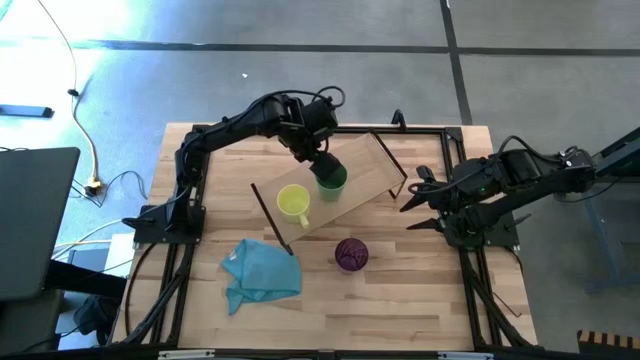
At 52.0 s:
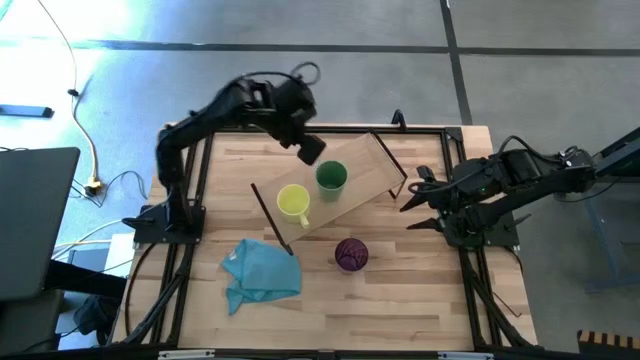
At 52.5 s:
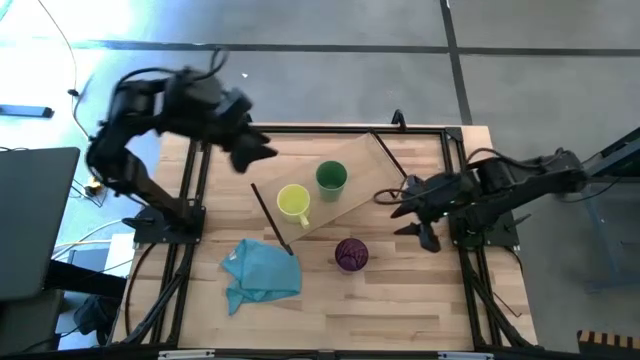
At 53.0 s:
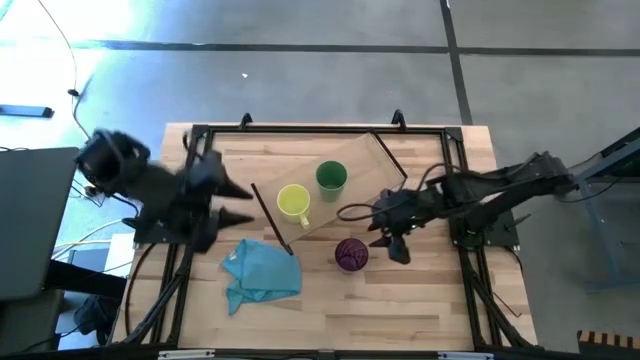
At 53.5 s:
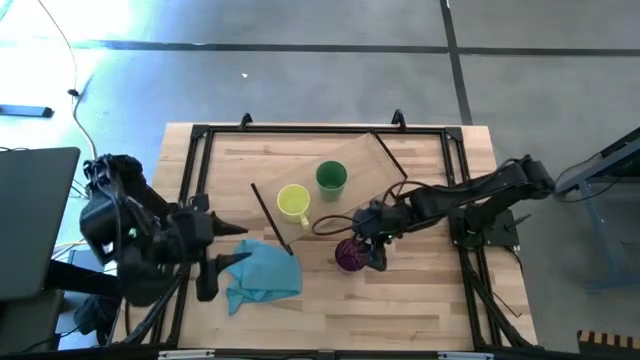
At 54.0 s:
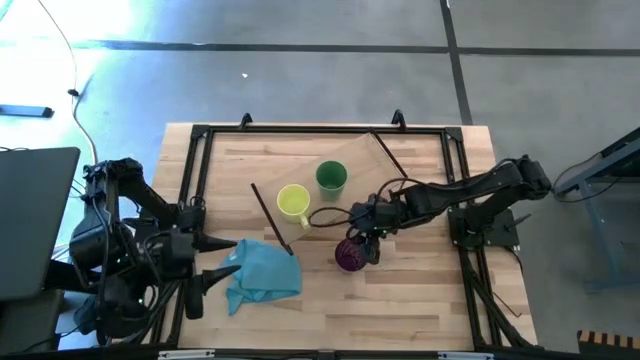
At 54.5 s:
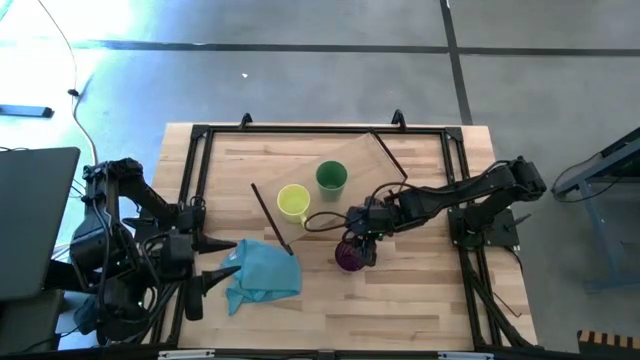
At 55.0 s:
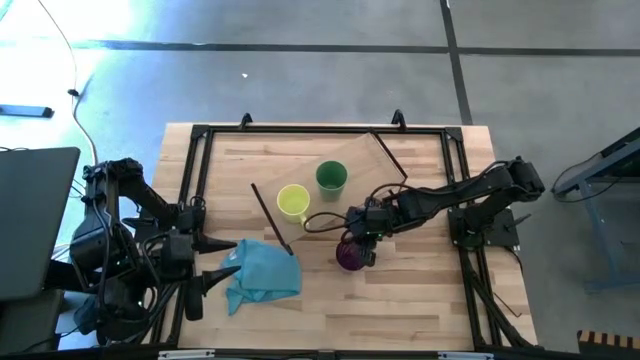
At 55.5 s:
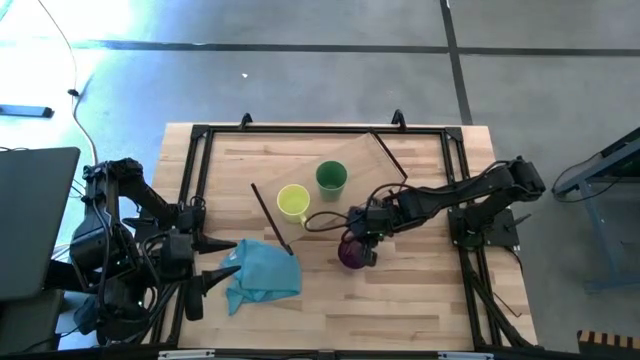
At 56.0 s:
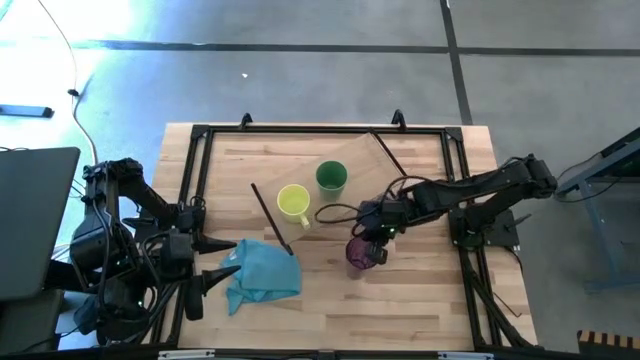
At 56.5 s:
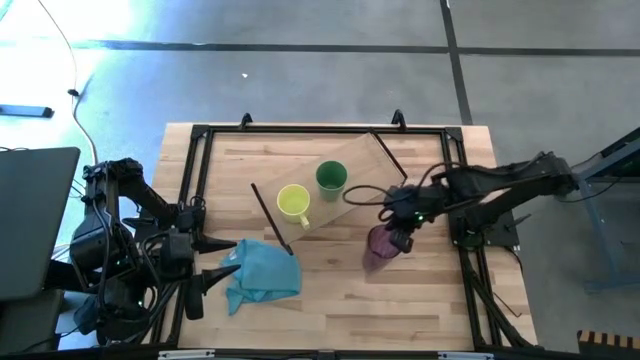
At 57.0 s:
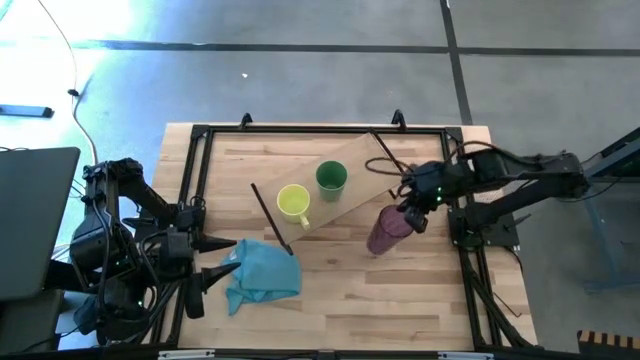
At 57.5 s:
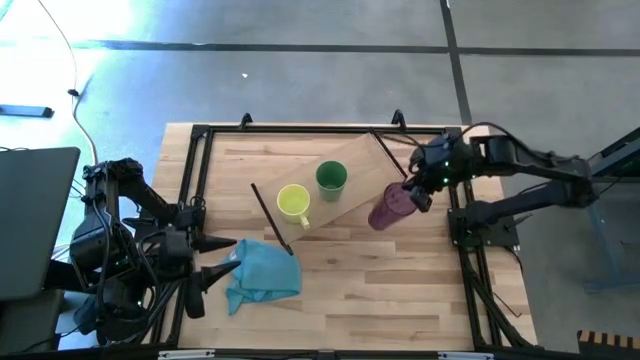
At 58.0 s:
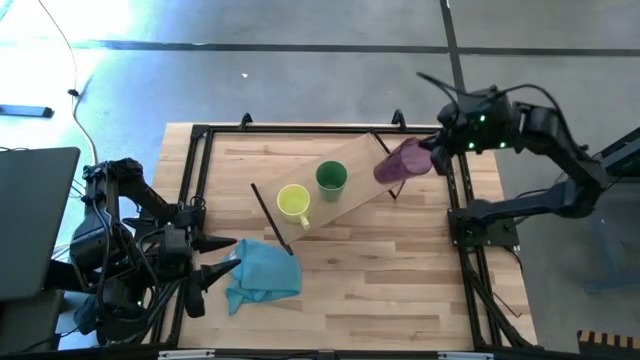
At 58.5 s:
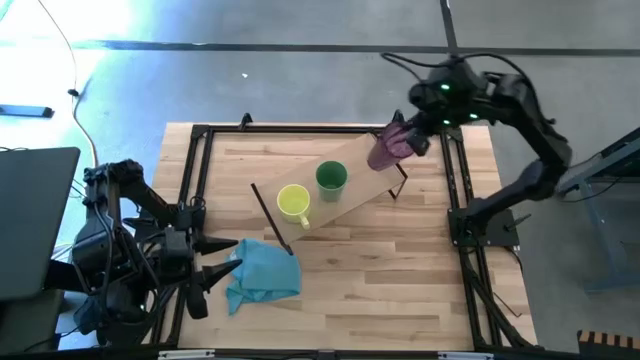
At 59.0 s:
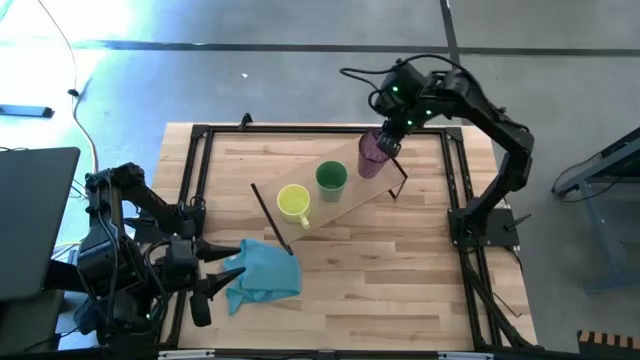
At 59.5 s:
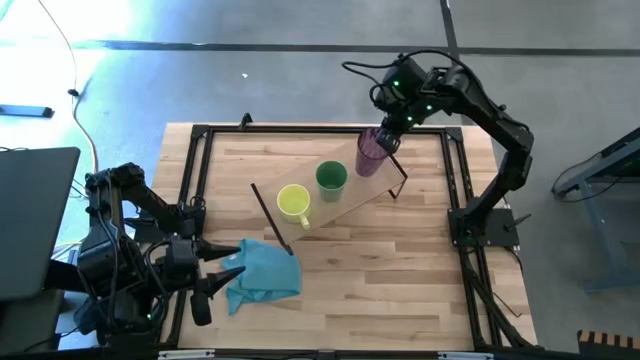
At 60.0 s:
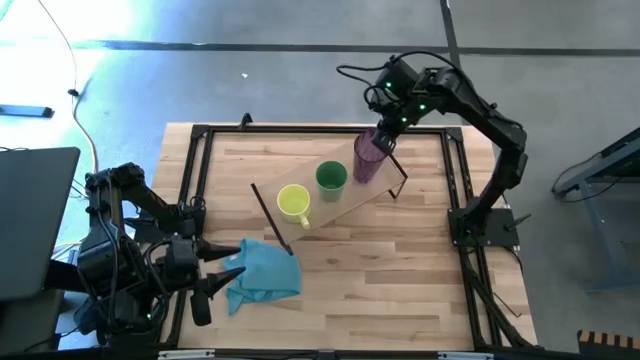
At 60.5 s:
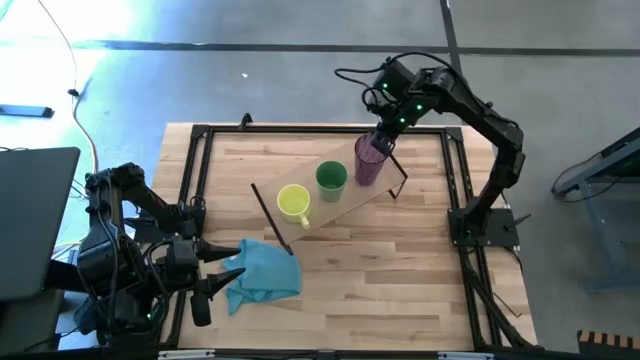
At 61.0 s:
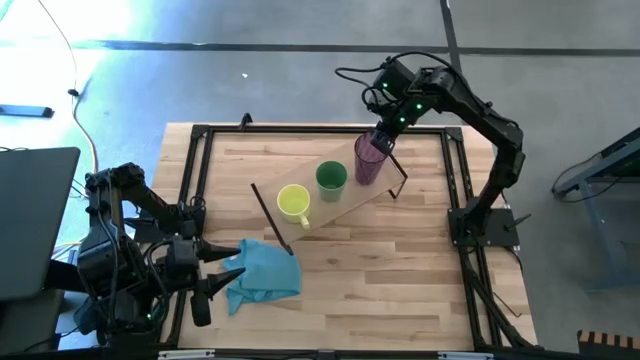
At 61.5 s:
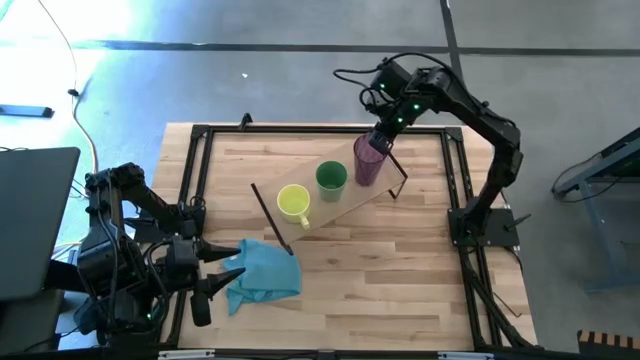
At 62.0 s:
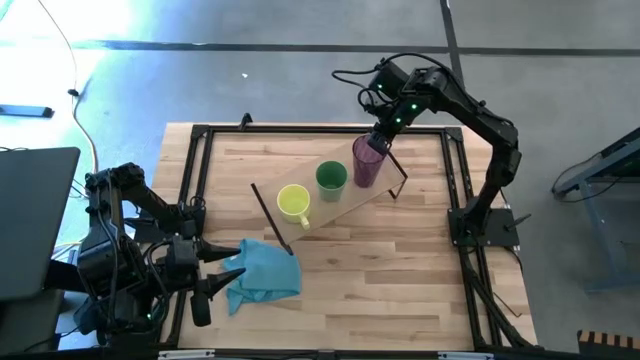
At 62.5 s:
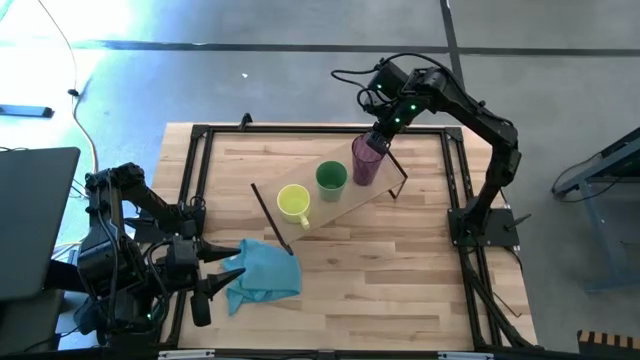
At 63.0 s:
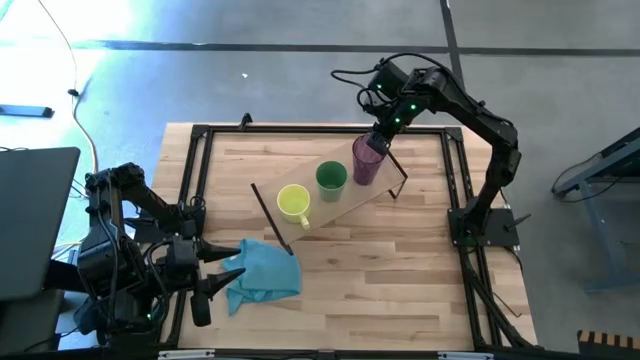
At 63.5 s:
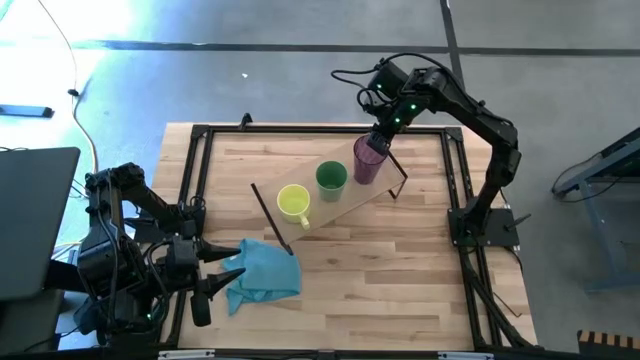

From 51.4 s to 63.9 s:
Task: Stack small to large cups/mugs on shelf
Put the purple cup on the shelf

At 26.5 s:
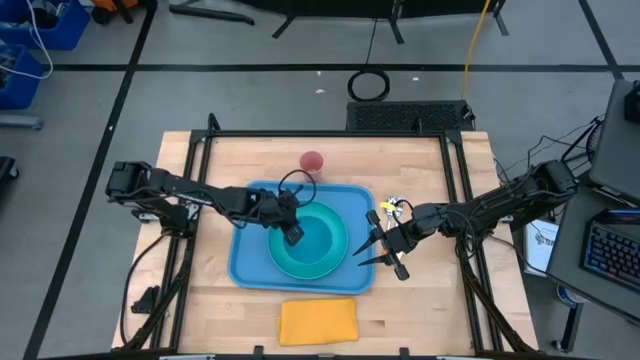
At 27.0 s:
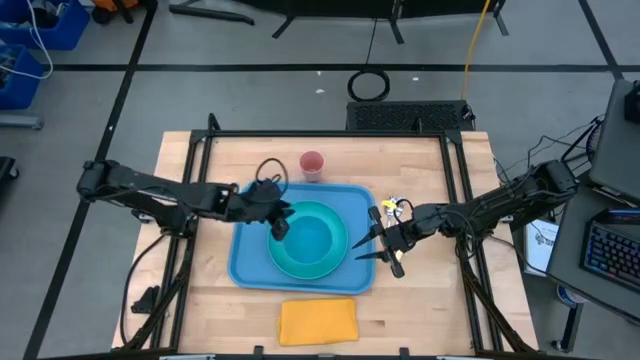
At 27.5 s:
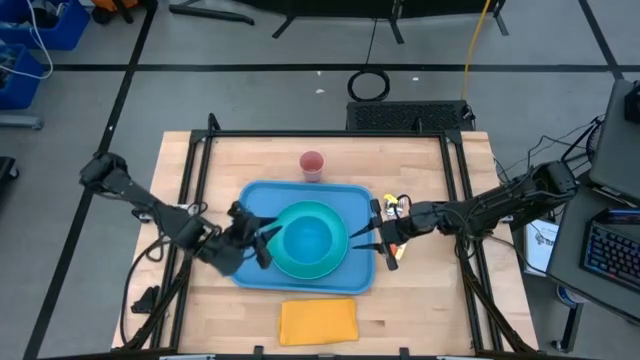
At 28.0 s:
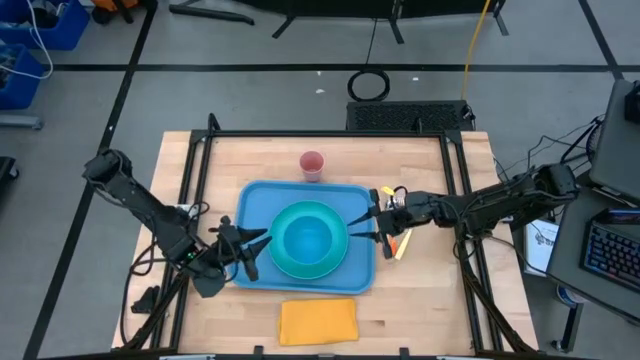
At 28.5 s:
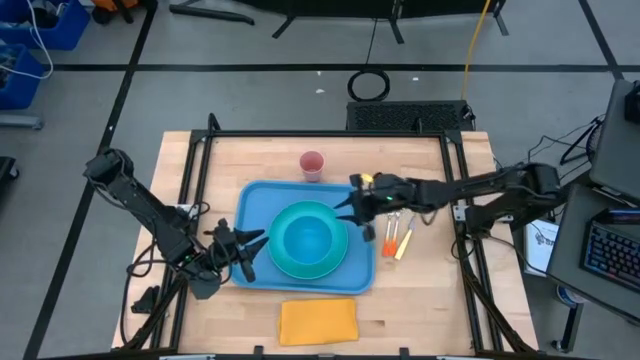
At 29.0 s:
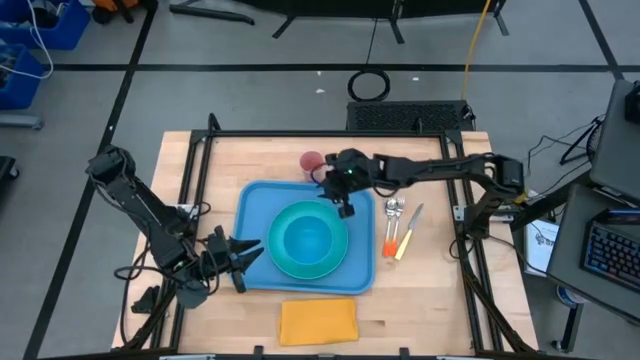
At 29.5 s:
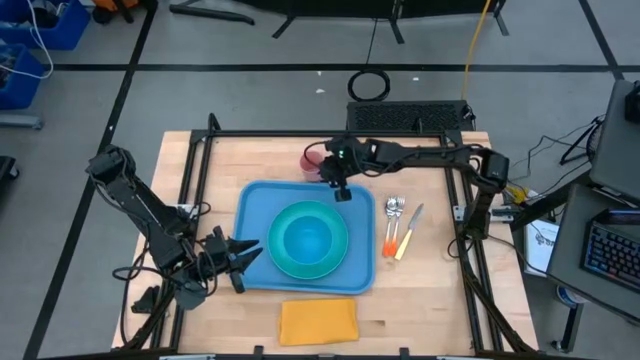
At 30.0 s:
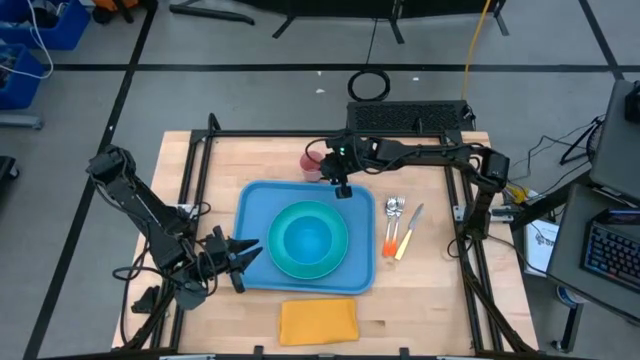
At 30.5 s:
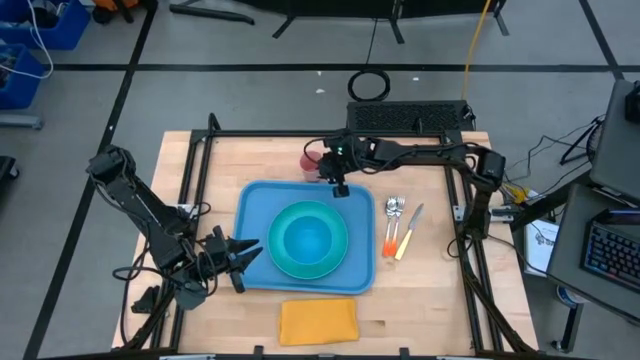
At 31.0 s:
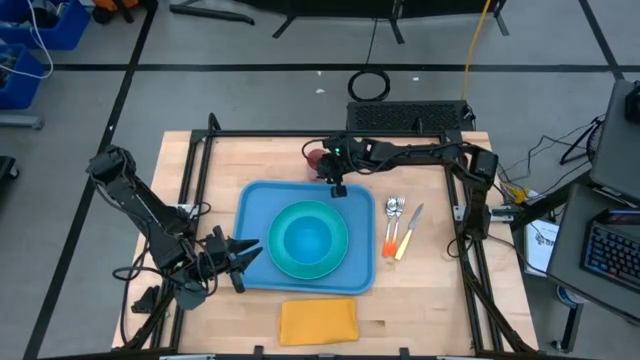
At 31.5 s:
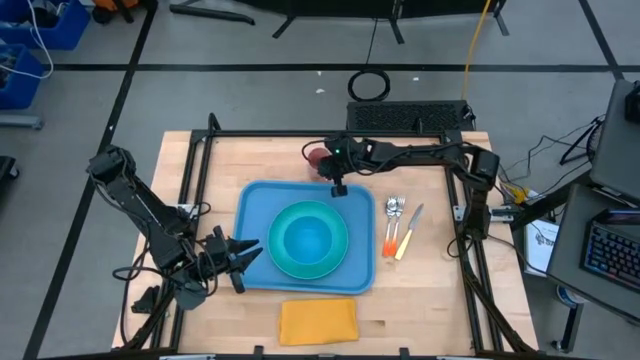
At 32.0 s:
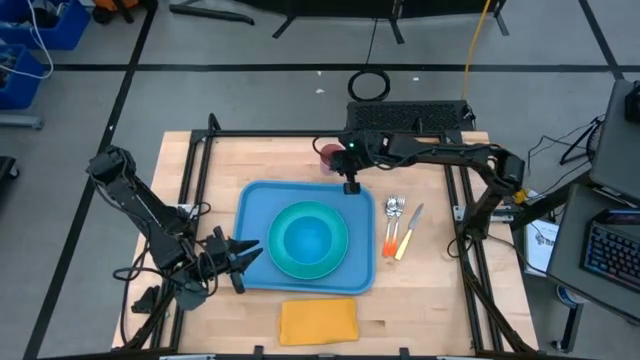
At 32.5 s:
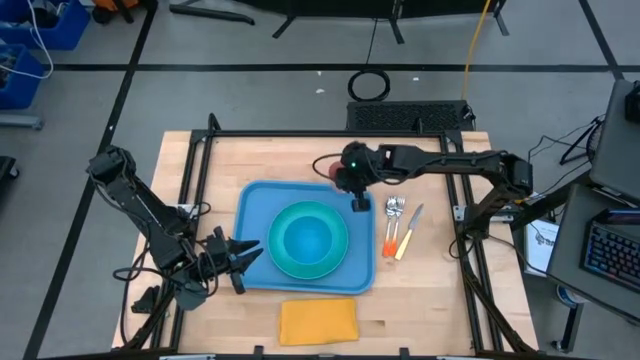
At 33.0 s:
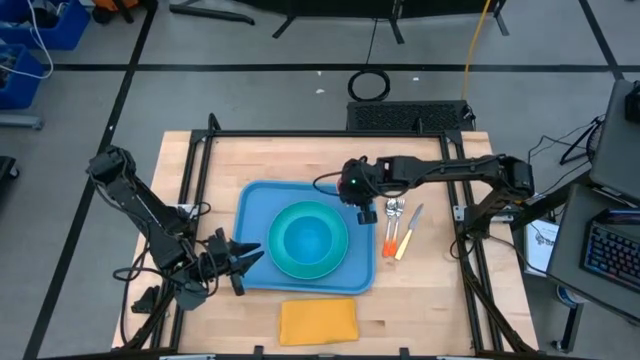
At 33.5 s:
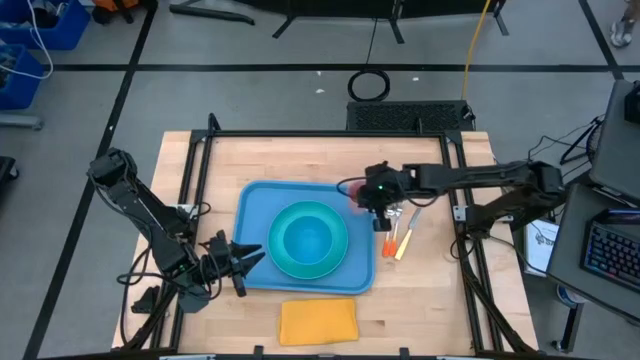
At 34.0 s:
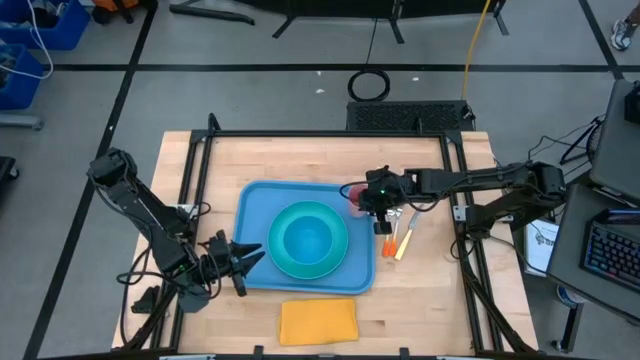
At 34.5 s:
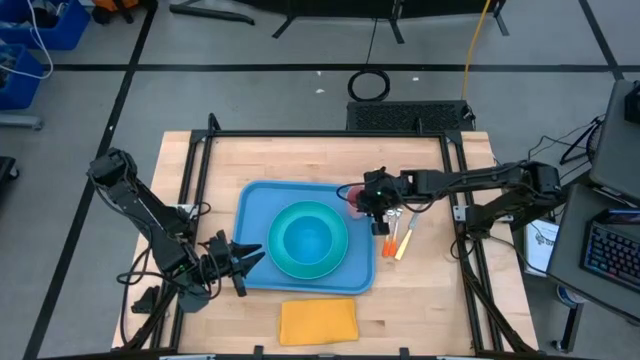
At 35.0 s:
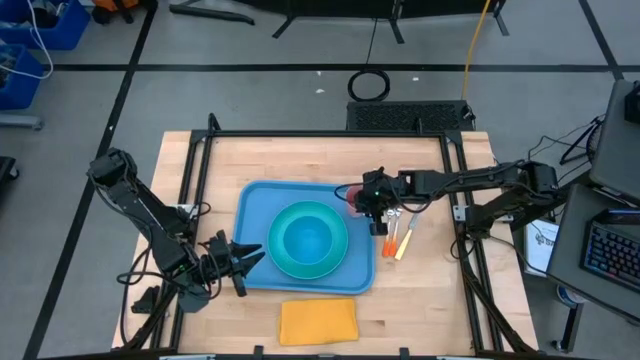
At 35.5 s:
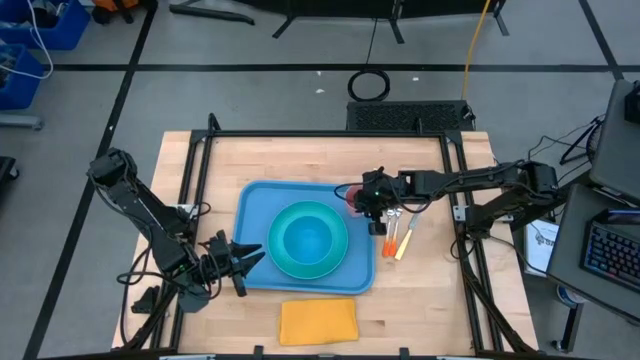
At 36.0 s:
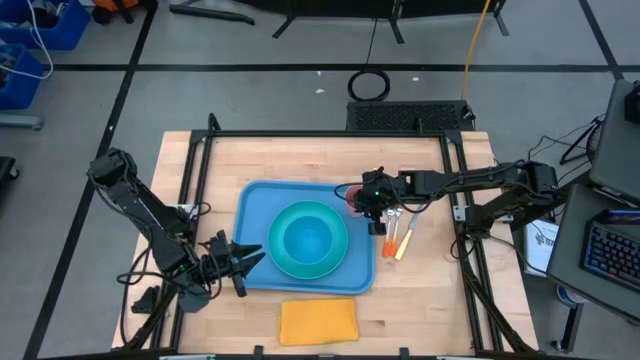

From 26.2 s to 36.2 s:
Task: Set up tray
Put the pink cup on the blue serving tray to the top right of the green plate
